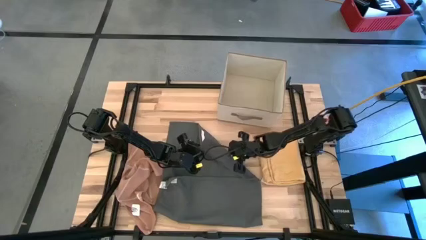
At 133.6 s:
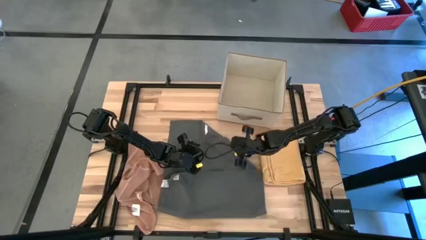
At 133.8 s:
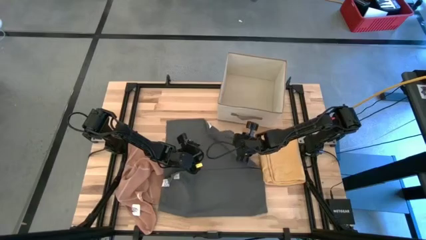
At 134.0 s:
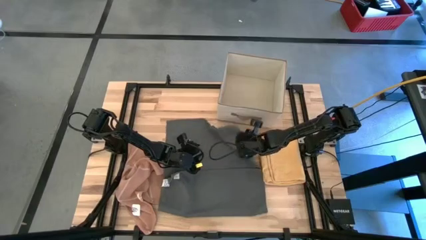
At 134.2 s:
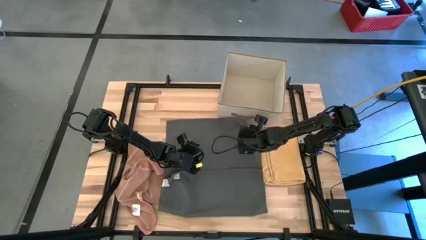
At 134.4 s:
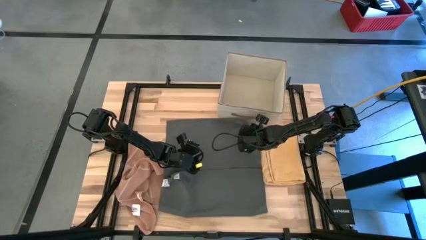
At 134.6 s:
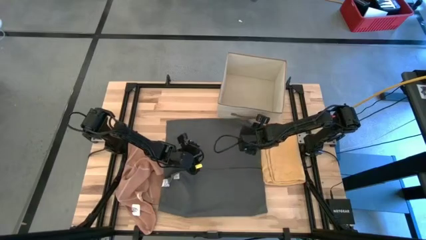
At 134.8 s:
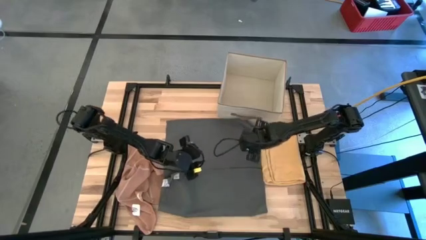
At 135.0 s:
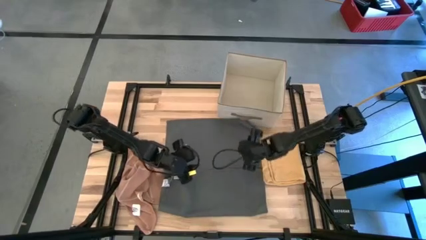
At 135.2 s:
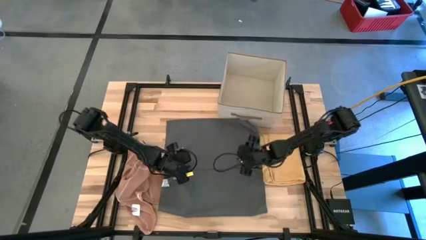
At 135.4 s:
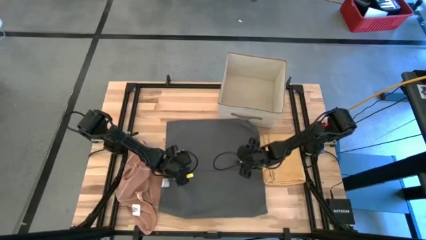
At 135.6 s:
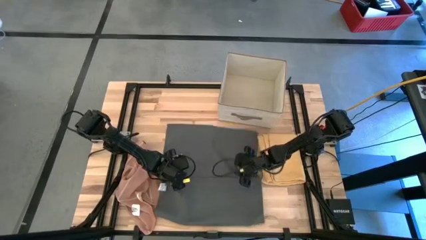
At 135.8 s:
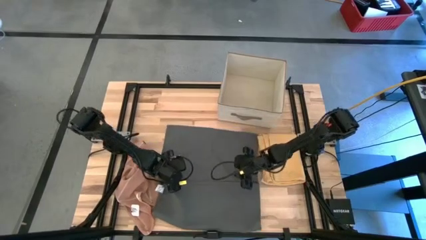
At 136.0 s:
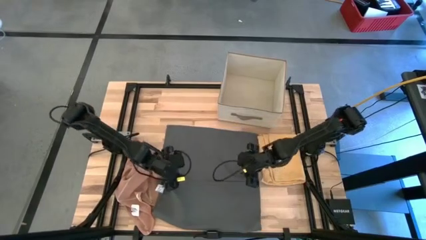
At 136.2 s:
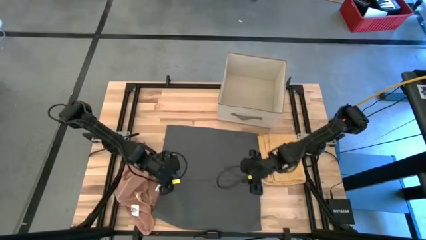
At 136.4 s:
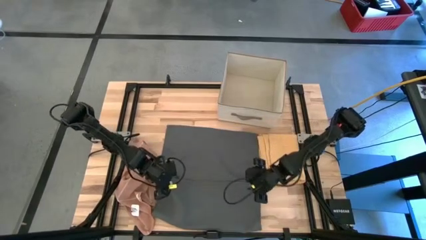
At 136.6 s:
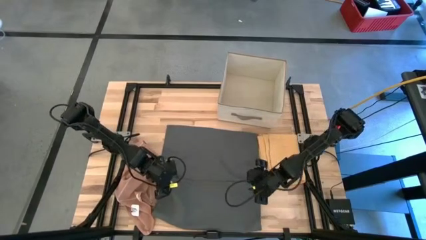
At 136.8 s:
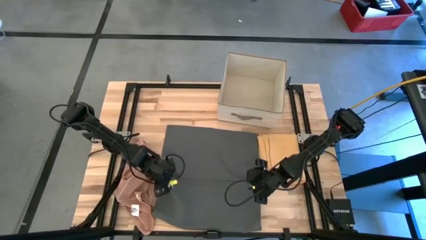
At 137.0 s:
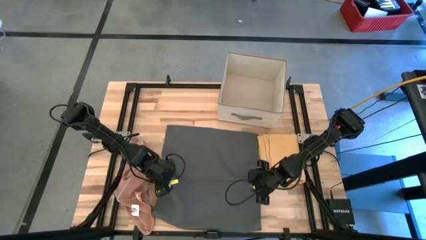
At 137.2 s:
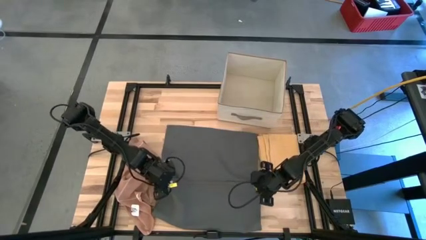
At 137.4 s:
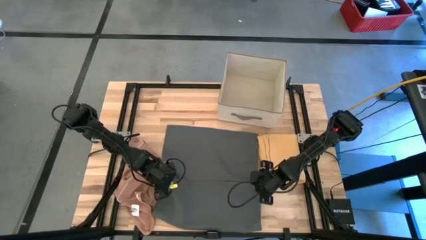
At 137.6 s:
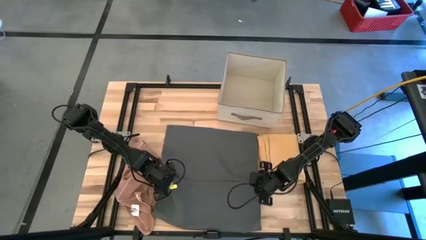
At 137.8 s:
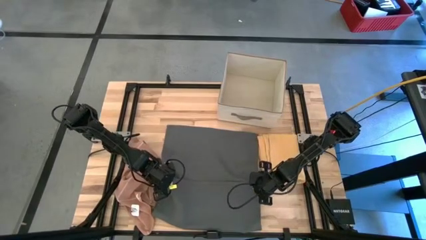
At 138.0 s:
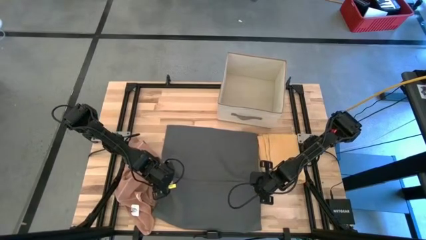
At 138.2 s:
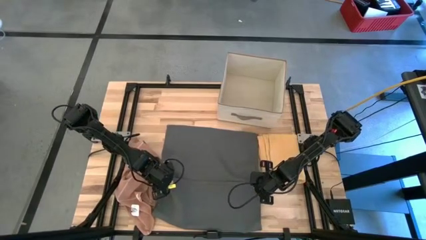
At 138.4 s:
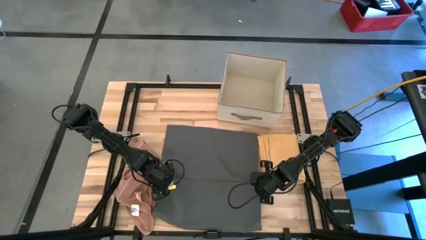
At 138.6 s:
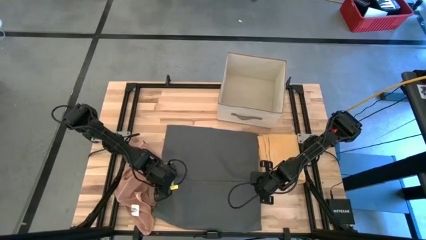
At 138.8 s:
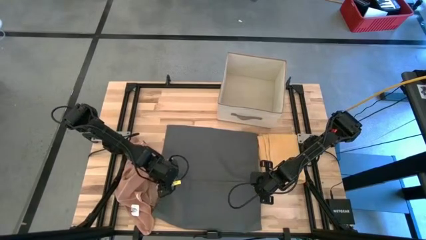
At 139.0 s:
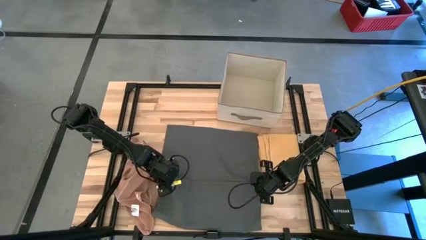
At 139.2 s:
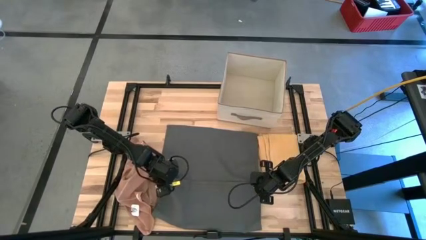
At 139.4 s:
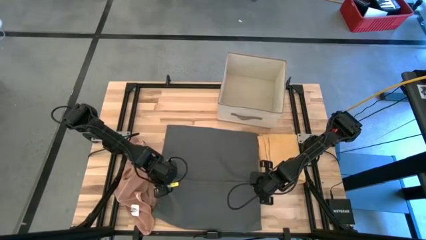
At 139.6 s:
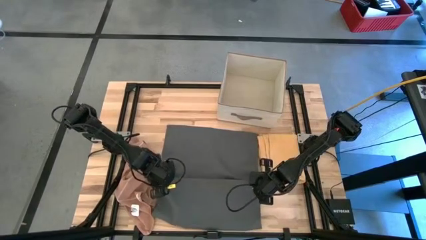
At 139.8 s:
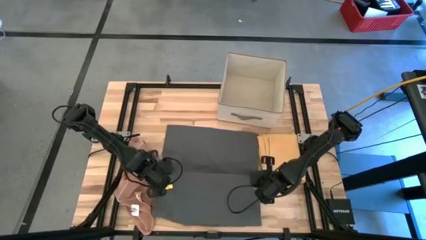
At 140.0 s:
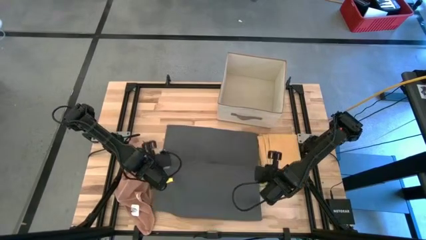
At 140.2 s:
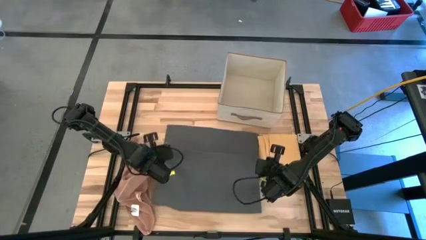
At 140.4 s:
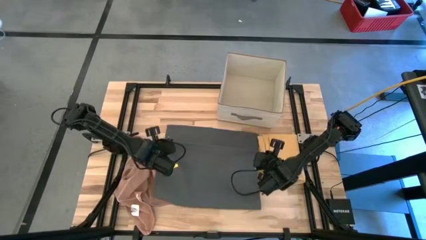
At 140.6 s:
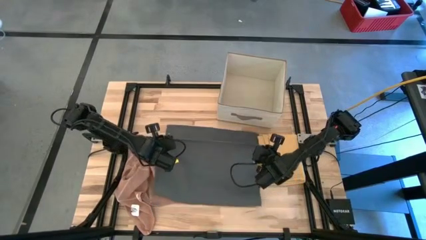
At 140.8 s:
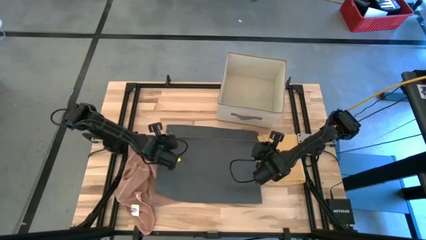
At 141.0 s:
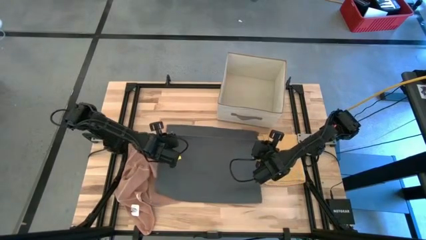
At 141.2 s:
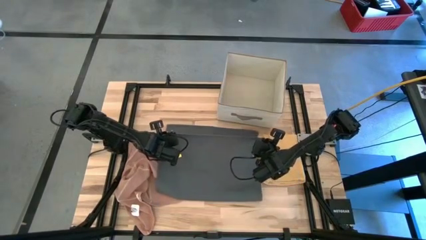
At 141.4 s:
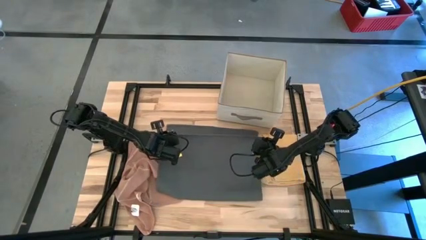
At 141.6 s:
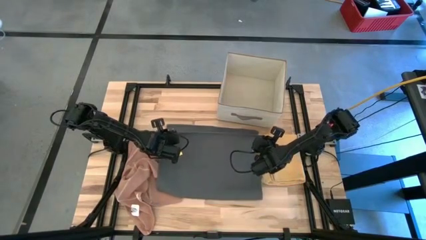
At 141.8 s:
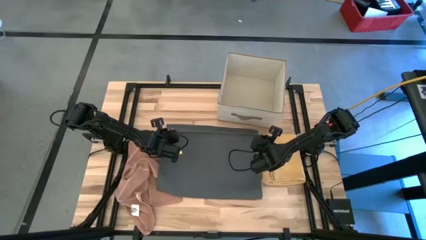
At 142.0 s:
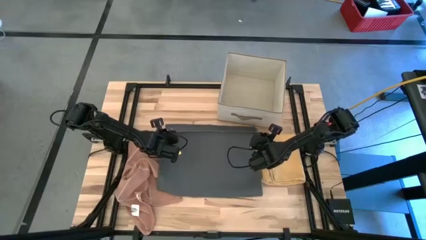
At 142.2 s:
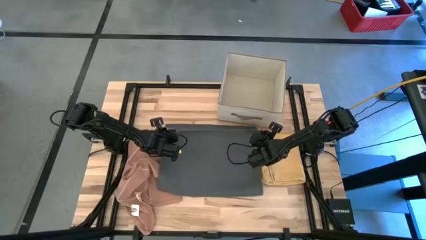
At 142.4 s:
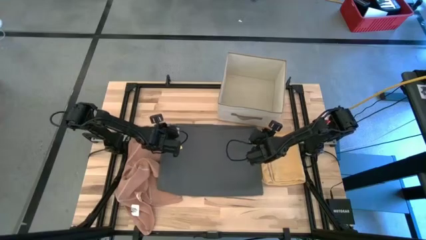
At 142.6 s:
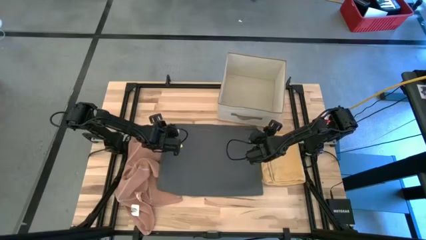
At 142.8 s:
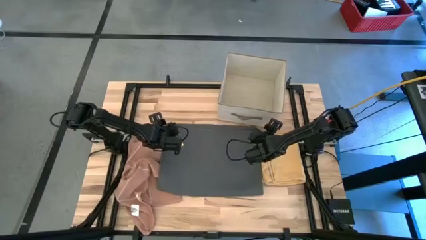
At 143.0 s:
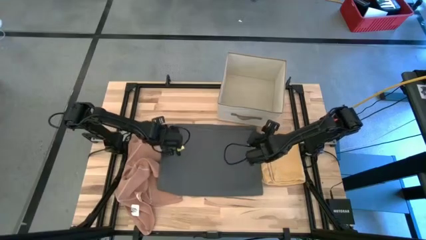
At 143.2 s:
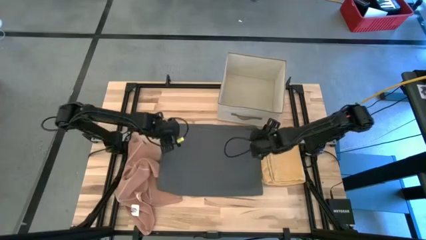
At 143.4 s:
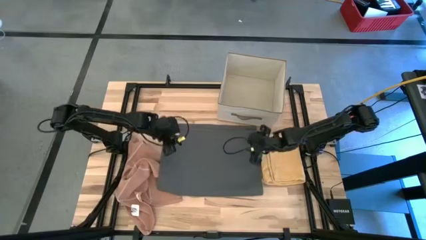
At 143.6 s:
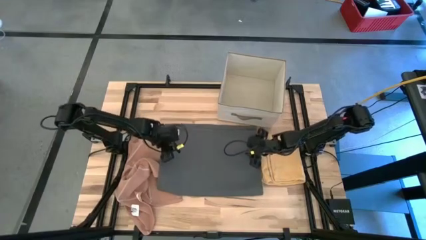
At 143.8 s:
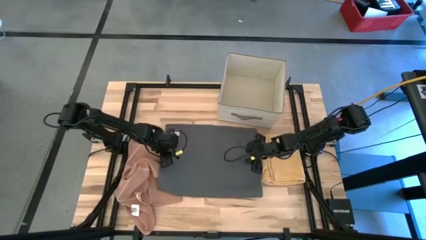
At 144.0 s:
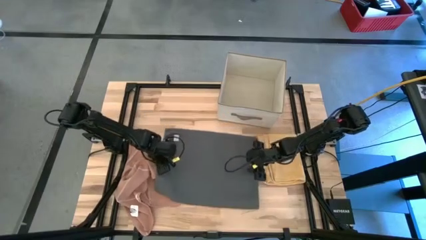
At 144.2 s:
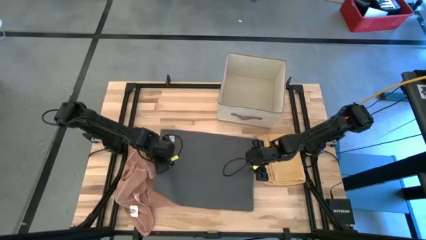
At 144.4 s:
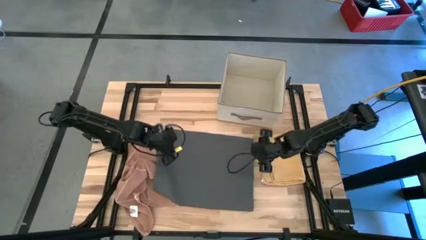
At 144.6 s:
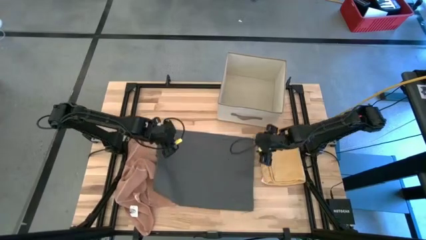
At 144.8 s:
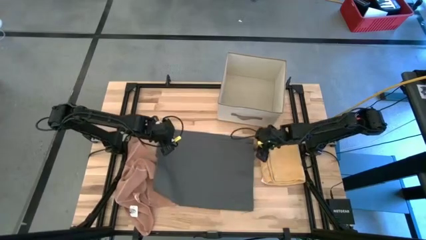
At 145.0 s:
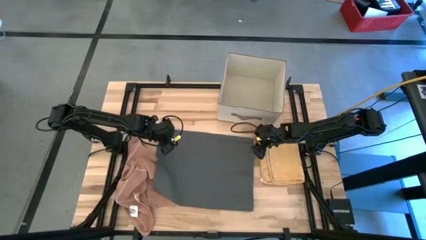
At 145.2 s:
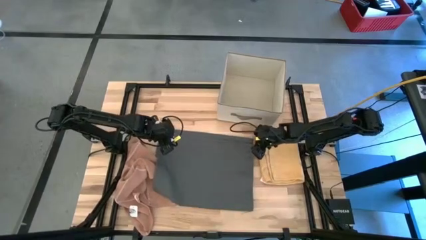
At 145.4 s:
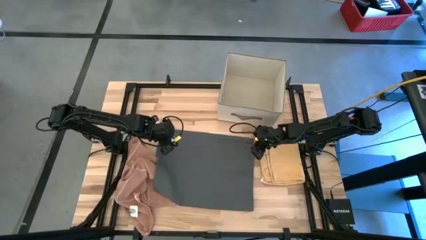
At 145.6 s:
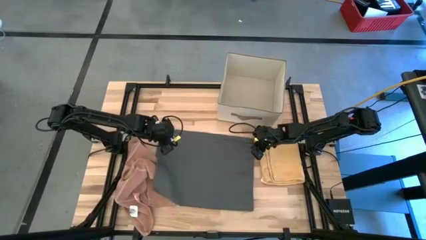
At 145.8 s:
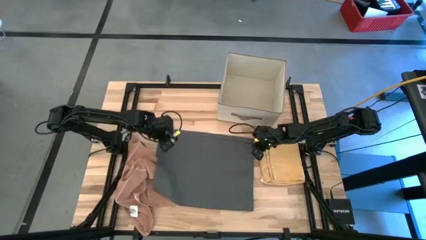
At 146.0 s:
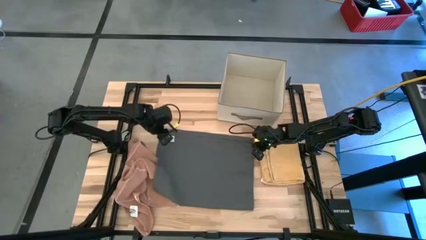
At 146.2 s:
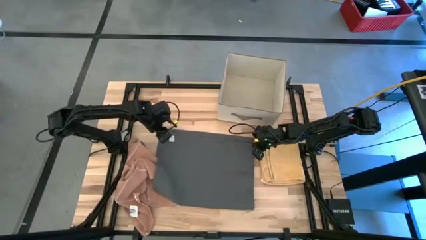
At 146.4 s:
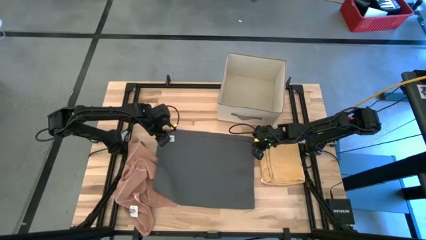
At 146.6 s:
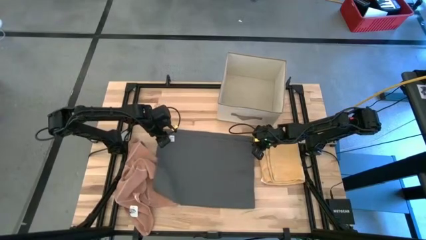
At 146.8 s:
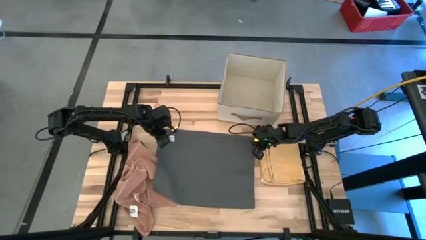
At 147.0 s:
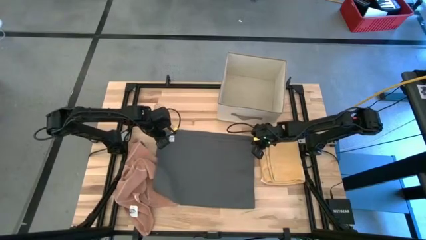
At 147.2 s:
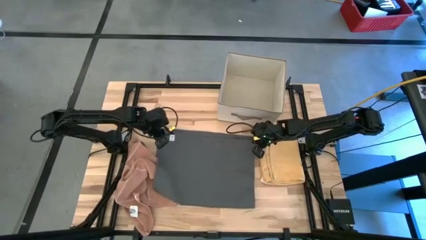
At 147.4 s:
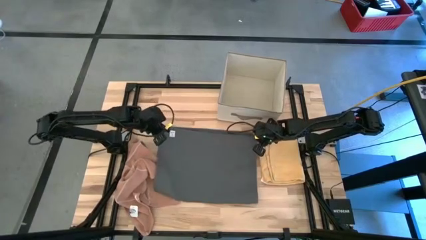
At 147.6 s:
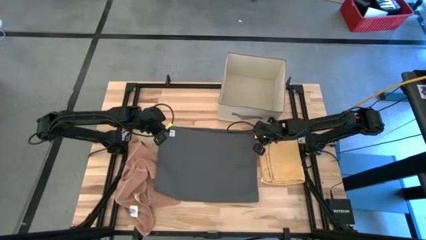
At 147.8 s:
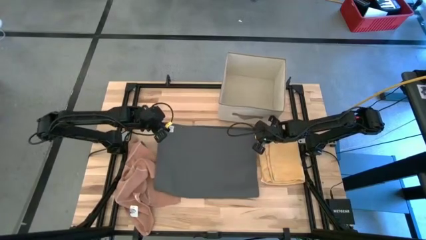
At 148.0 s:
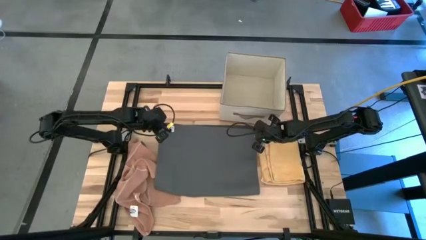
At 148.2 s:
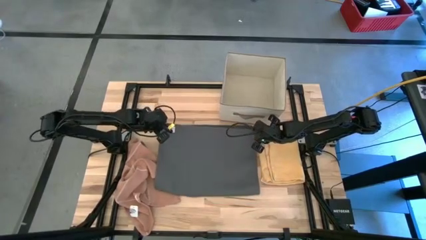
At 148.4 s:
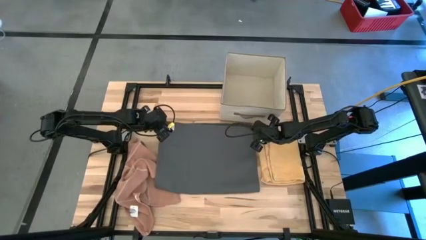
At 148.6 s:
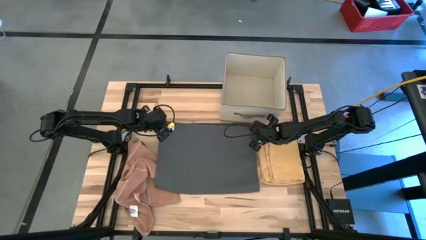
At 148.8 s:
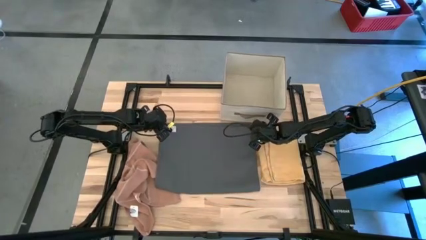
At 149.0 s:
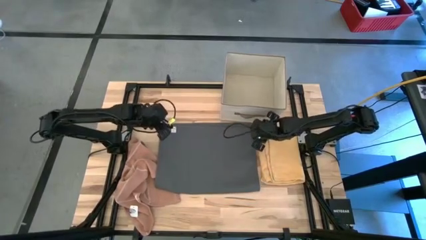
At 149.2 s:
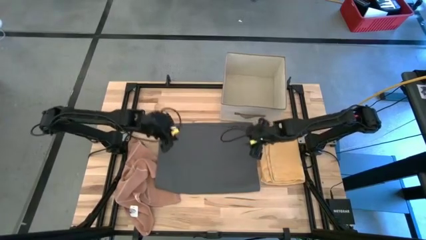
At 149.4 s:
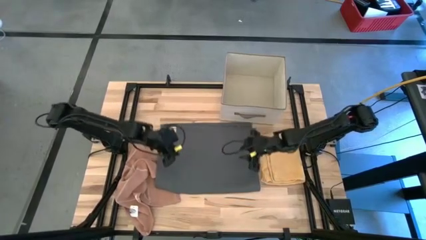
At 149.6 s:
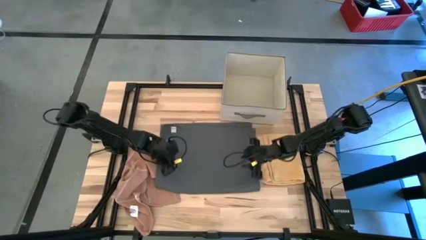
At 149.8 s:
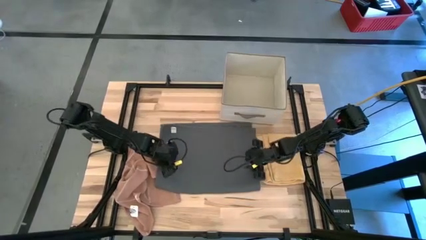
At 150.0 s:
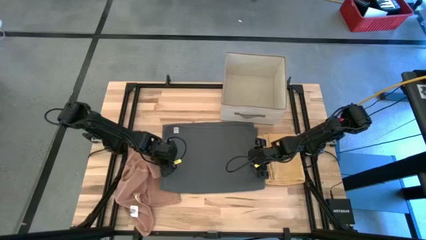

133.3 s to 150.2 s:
Task: Fold towel
Fold the gray towel
